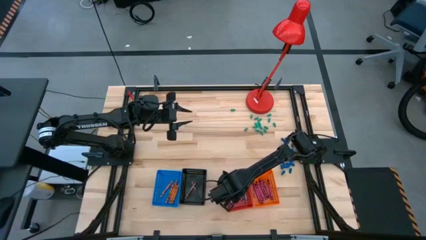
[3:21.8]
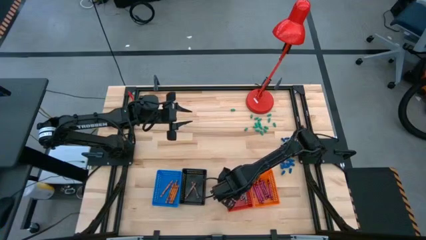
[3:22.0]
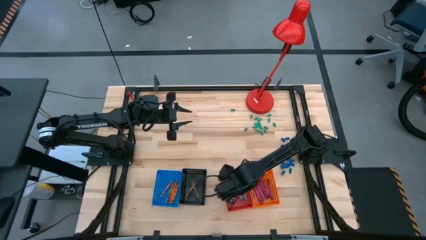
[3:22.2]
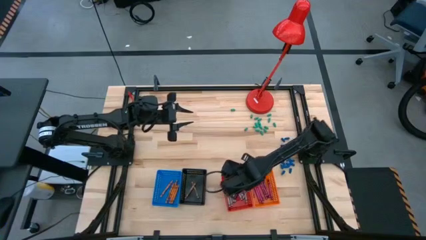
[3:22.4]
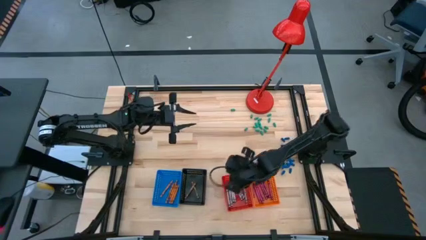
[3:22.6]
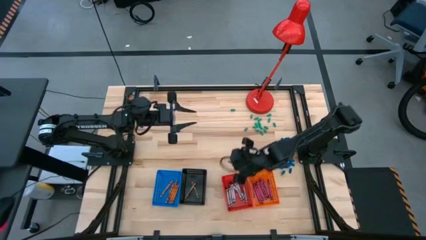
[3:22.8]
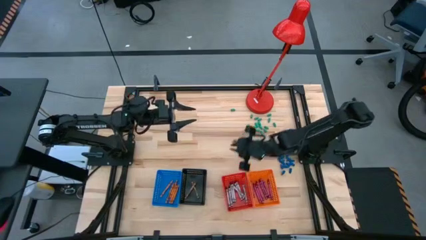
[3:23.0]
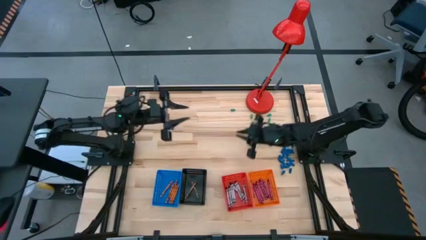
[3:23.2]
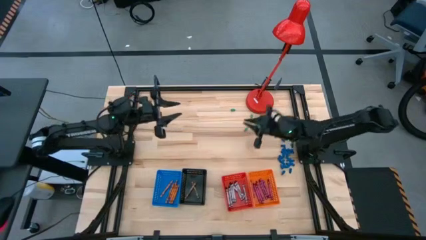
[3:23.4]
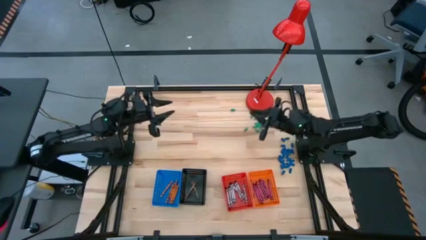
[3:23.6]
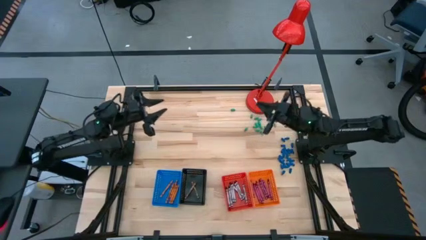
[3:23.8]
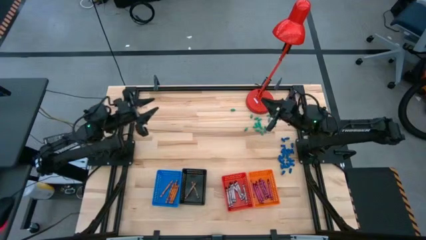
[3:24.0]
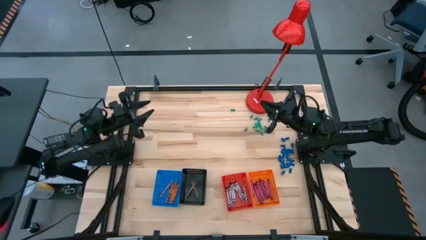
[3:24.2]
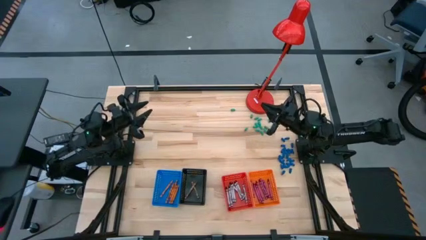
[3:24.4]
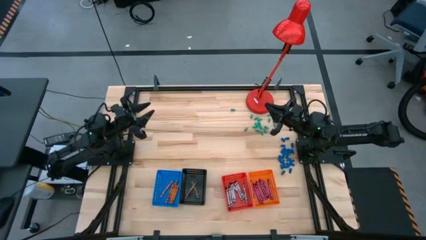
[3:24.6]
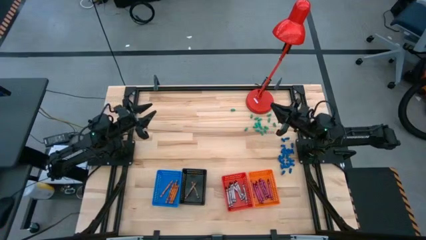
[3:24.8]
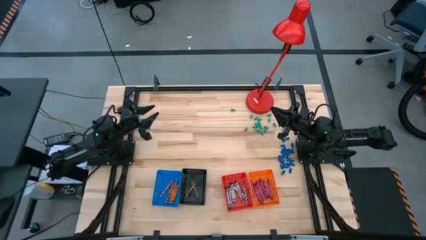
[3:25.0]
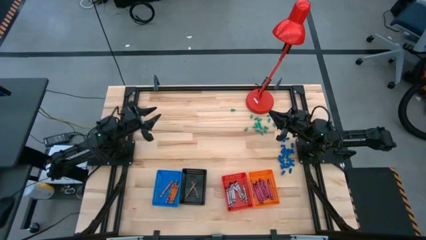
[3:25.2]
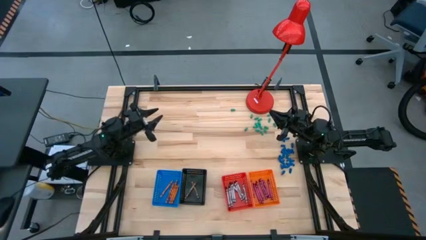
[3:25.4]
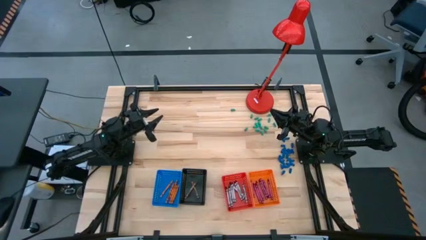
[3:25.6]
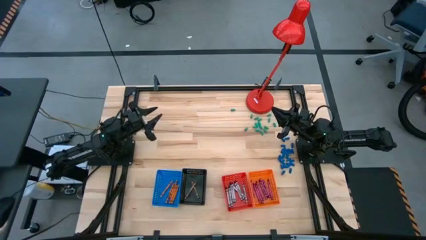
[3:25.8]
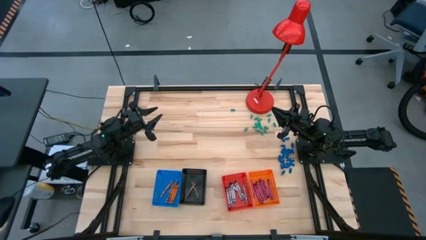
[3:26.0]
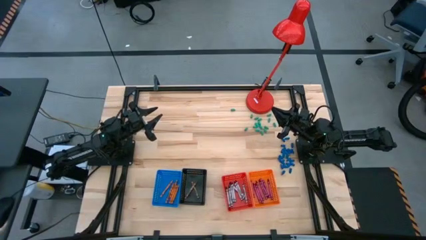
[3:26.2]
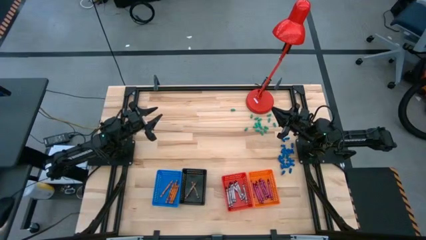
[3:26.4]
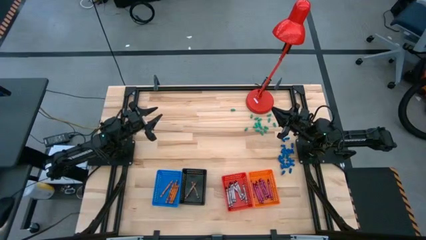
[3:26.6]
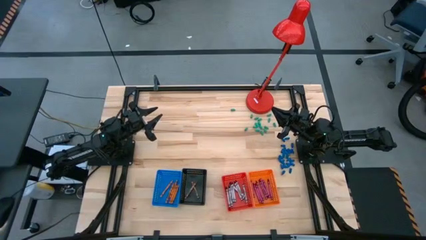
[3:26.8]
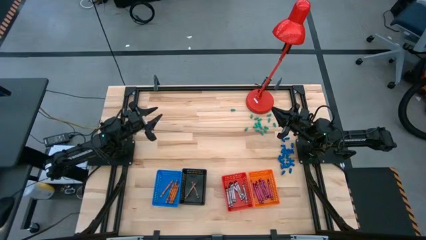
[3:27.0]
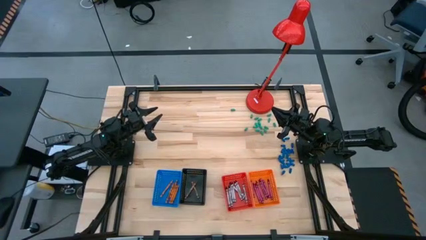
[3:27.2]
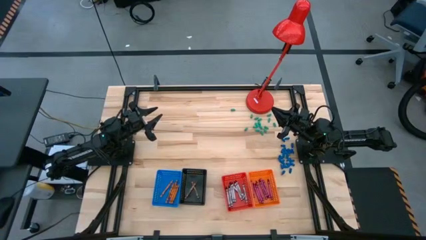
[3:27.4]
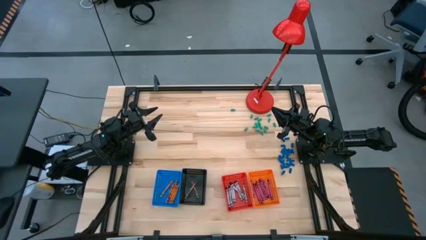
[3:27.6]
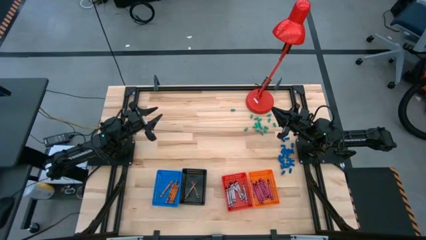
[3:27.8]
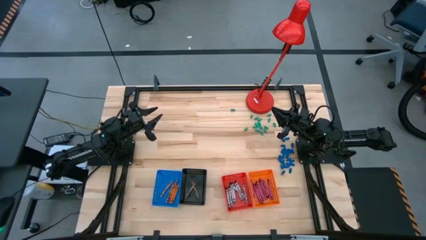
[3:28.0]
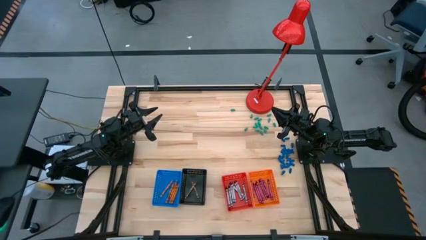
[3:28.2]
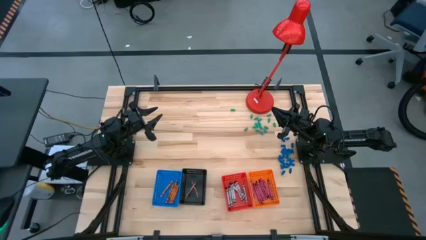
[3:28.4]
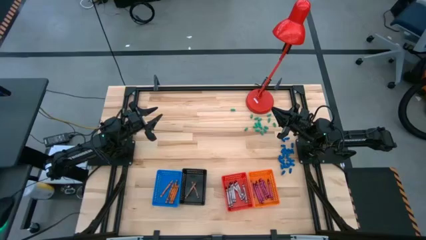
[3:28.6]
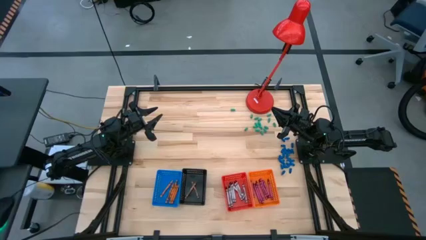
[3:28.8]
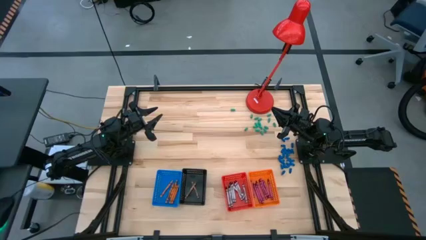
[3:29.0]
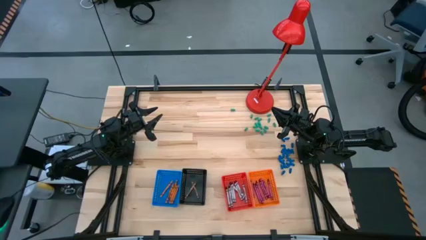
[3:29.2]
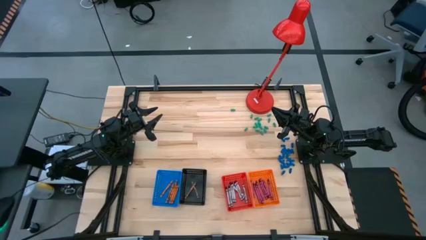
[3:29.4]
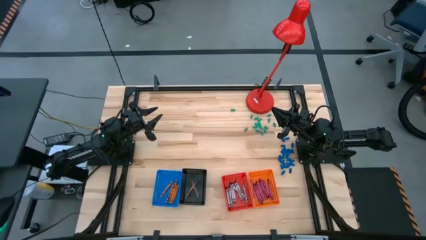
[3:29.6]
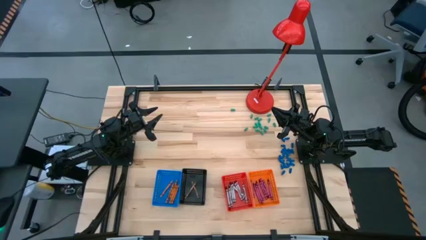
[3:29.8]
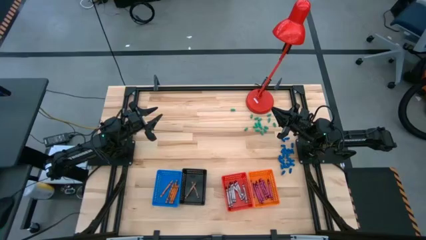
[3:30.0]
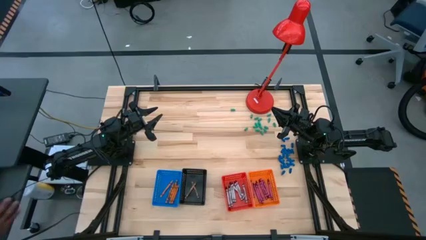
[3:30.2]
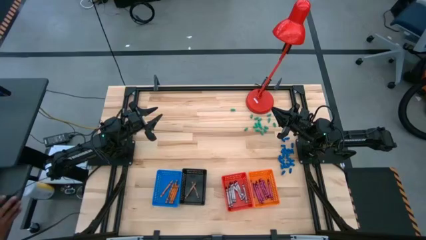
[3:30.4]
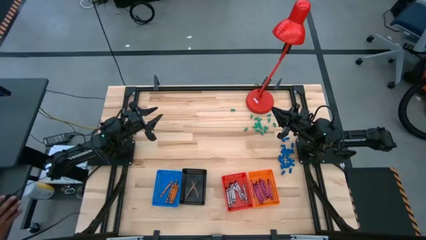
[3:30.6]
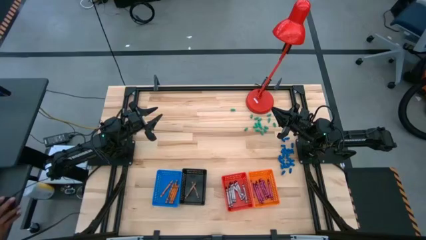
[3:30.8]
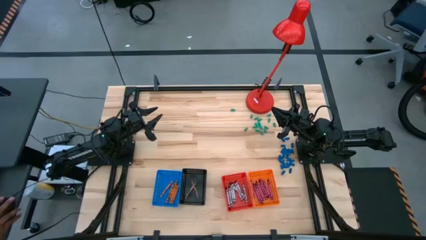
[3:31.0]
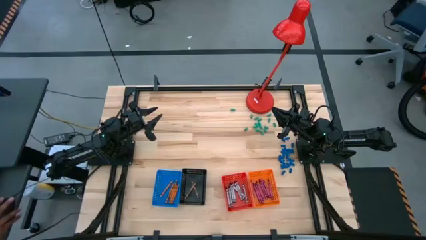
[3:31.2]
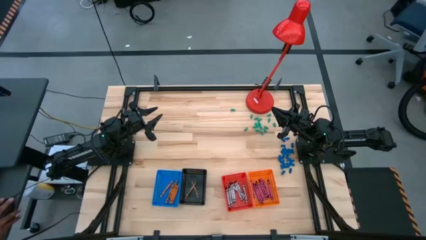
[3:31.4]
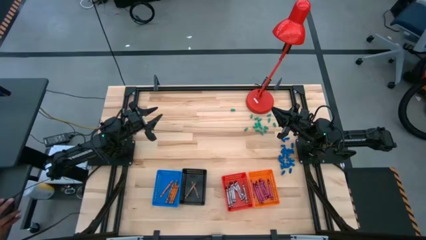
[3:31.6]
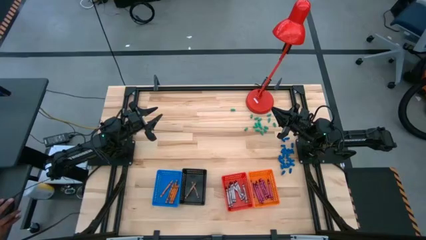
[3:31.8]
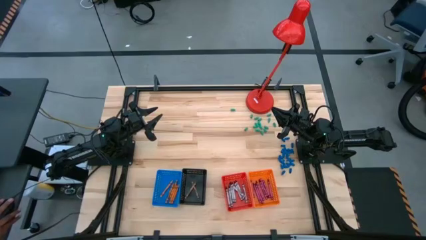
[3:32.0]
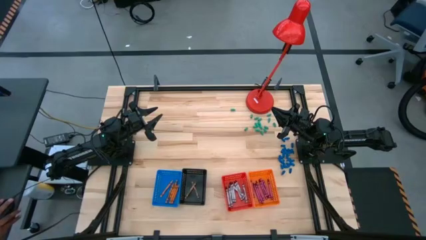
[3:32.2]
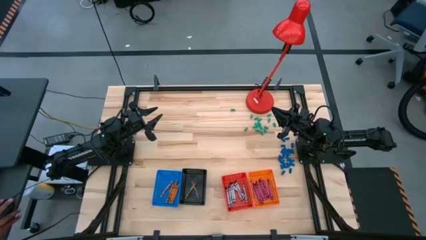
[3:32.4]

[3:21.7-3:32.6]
Task: Sort crayons
Return to Home Position

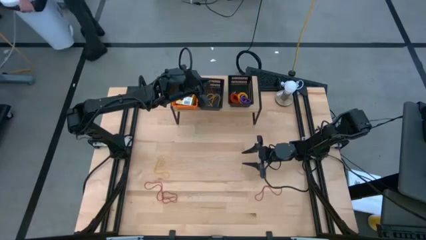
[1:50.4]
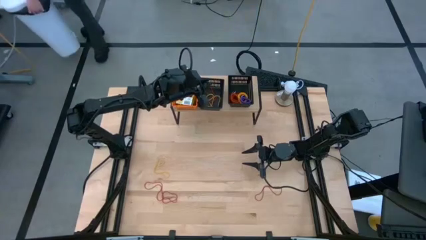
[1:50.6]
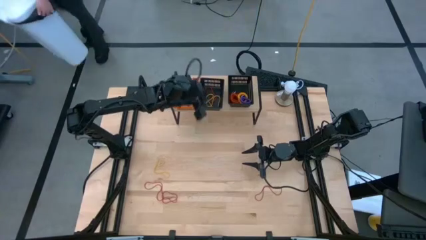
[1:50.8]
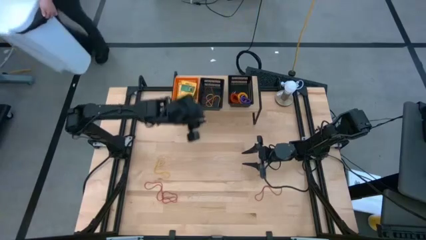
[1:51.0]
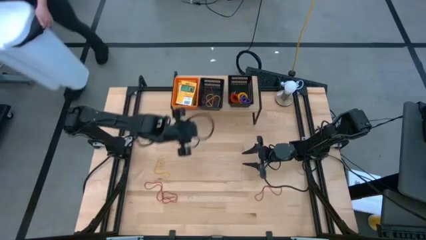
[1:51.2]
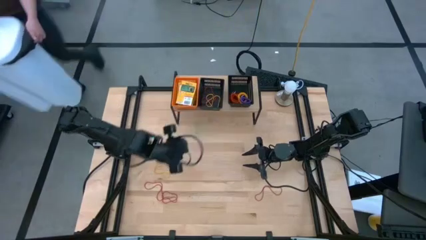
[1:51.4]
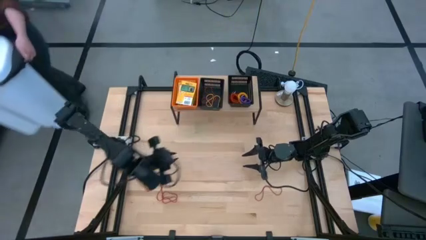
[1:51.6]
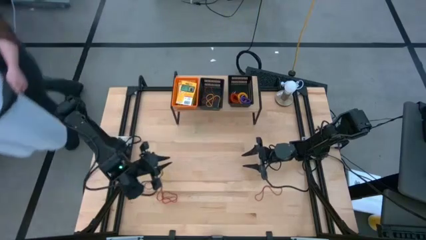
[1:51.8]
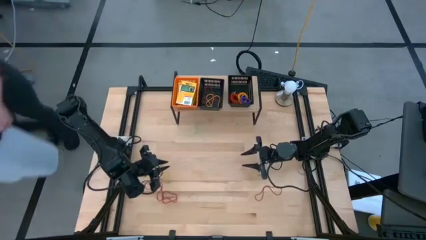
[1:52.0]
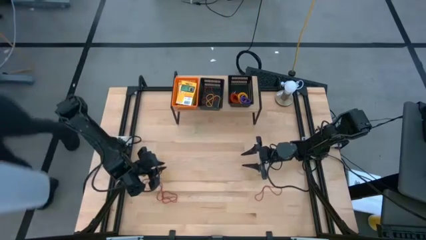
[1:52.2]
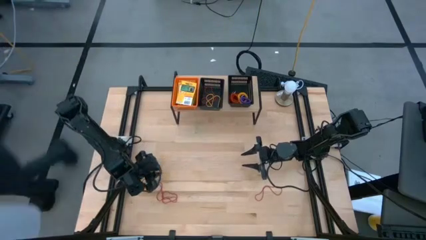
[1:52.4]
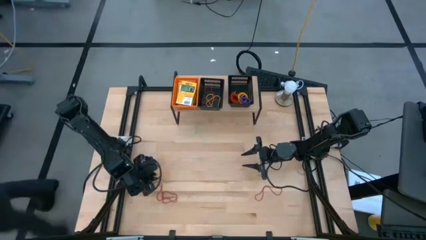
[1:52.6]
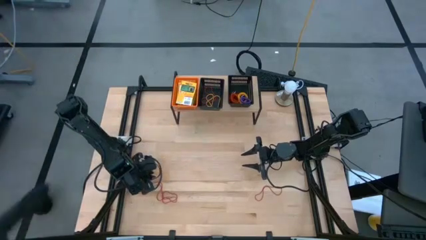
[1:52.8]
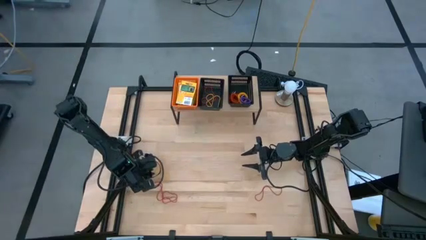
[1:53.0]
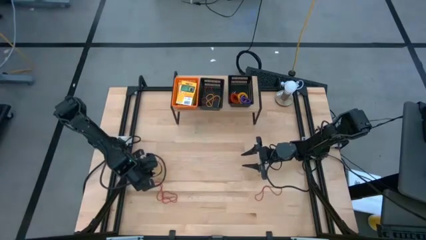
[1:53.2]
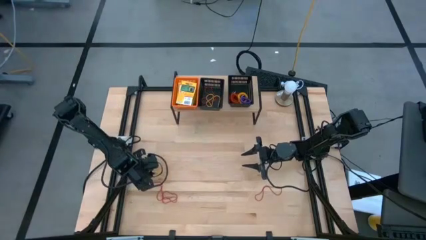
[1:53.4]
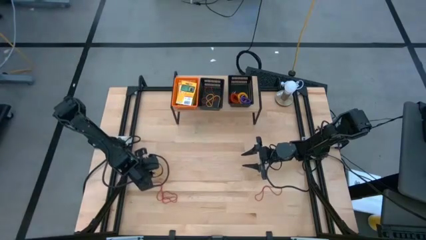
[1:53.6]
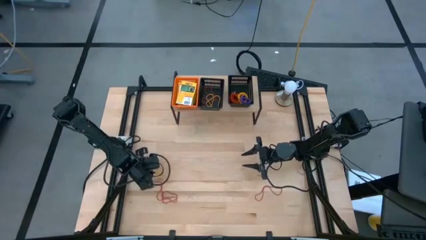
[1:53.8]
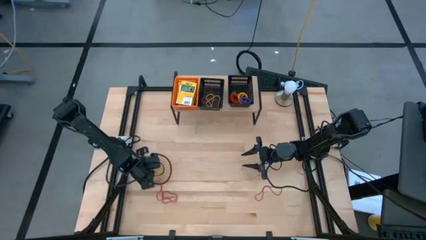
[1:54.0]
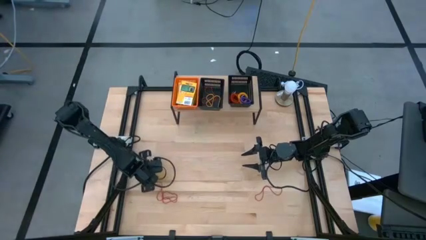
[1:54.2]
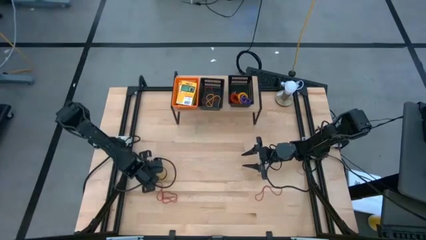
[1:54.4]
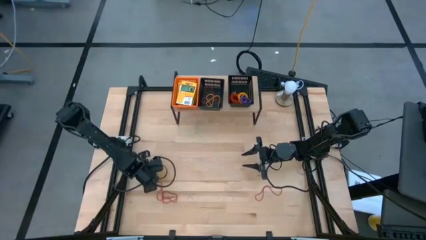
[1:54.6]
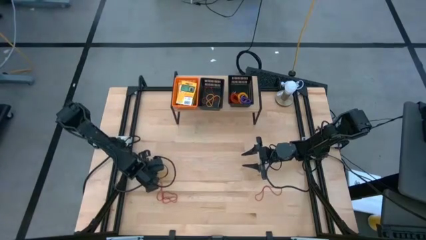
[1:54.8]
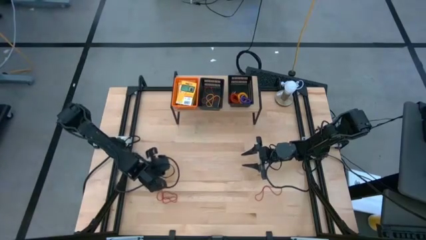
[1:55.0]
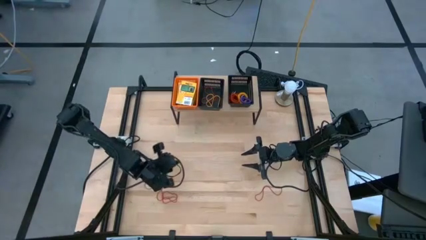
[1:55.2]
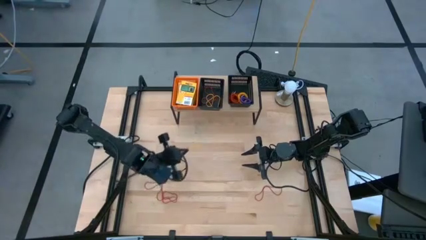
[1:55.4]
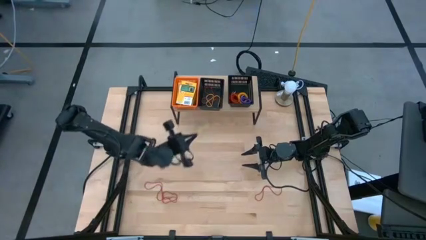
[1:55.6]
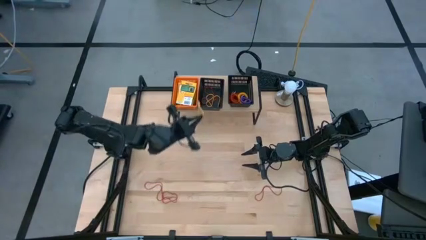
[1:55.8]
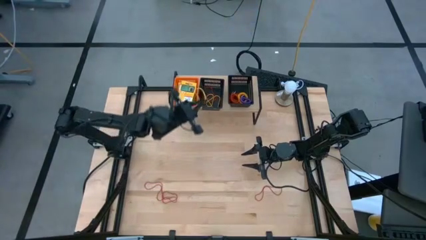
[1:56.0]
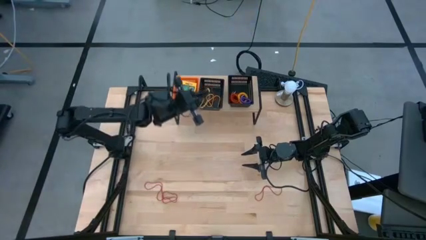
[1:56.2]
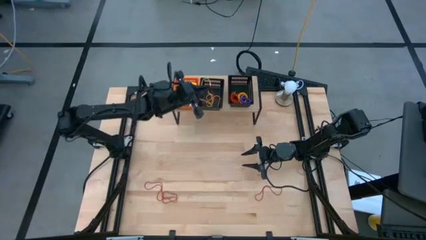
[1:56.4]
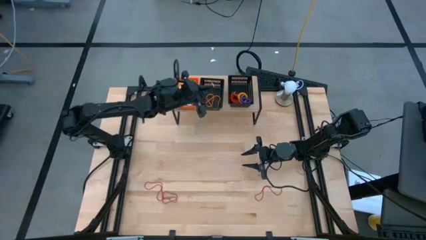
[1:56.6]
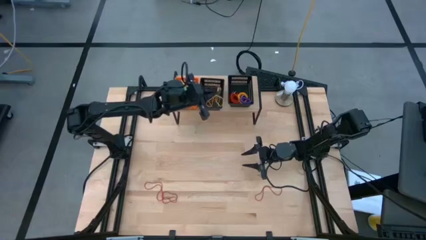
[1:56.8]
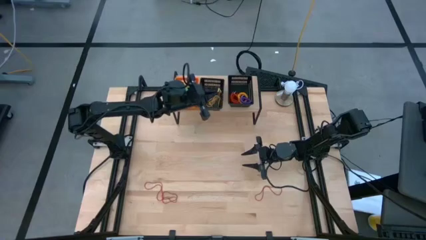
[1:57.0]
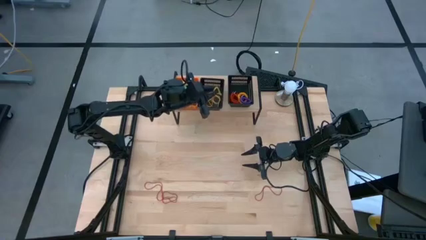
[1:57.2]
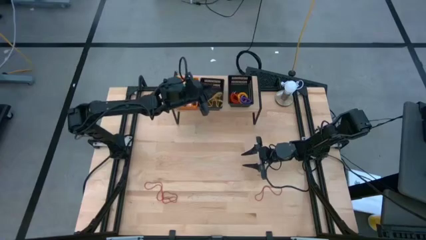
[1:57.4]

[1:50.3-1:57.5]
Task: Pick & Place Office Desk Supplies
Put the yellow rubber band into the left black bin on the shelf
